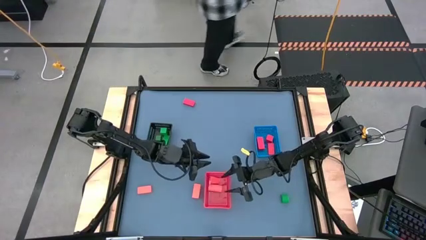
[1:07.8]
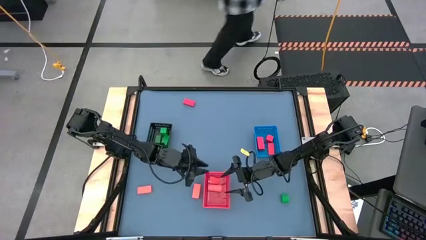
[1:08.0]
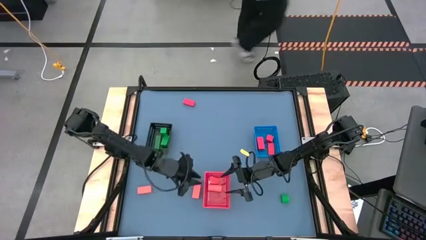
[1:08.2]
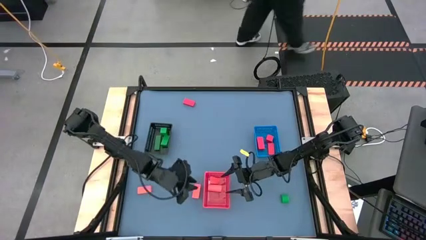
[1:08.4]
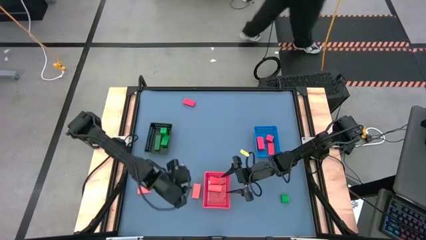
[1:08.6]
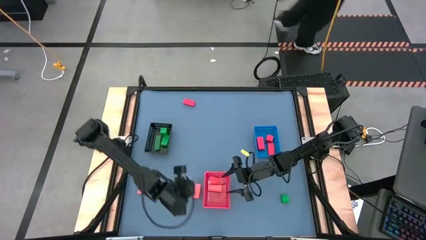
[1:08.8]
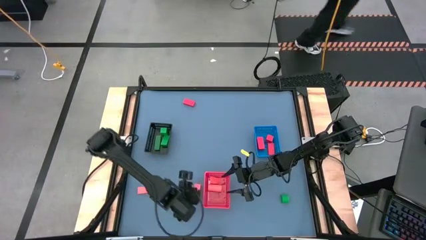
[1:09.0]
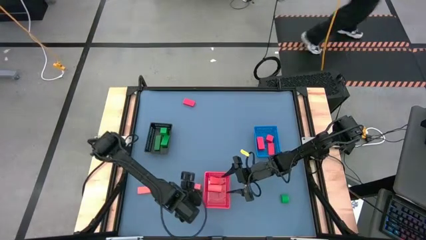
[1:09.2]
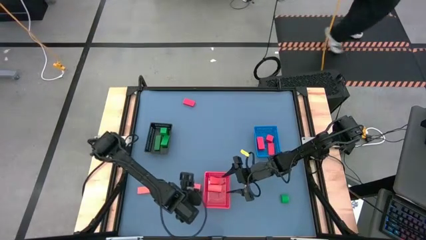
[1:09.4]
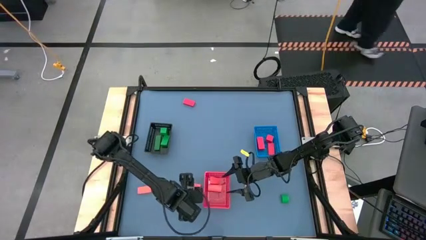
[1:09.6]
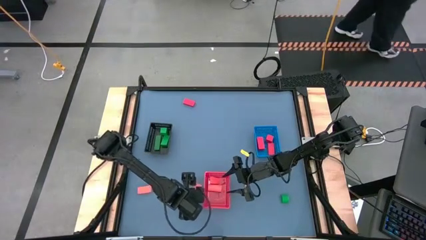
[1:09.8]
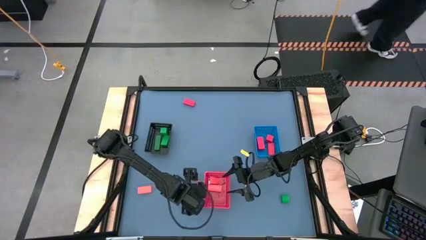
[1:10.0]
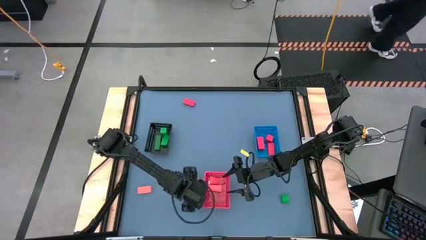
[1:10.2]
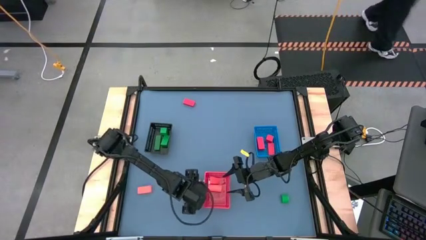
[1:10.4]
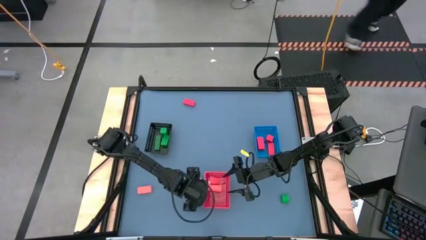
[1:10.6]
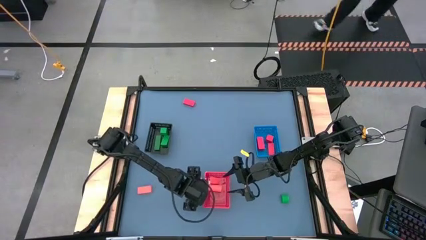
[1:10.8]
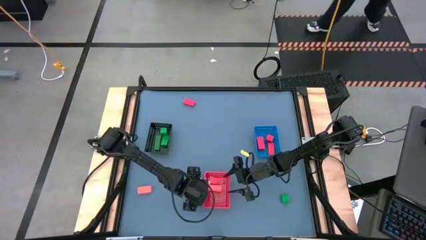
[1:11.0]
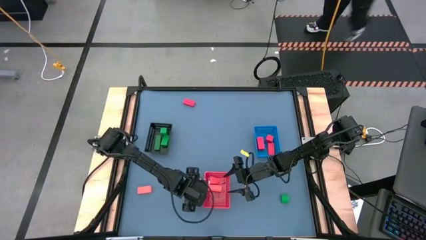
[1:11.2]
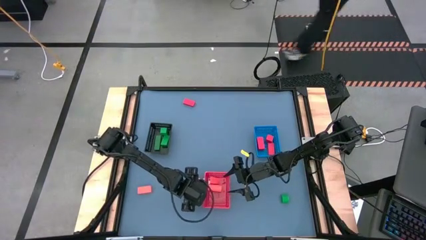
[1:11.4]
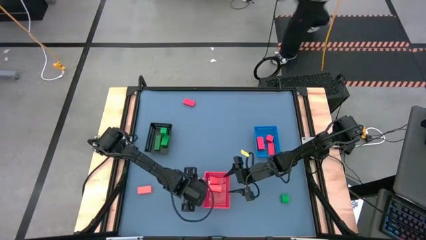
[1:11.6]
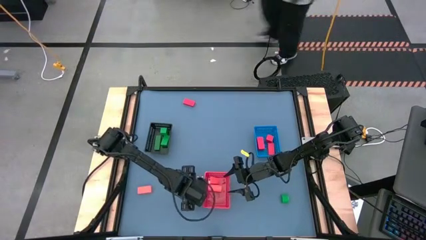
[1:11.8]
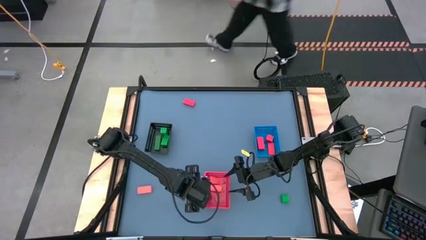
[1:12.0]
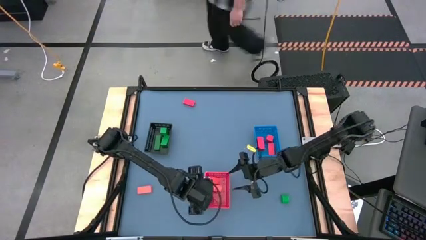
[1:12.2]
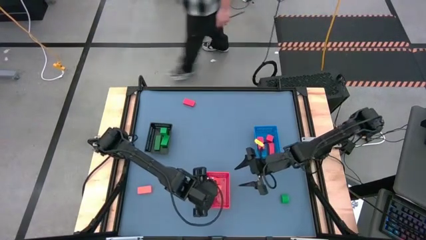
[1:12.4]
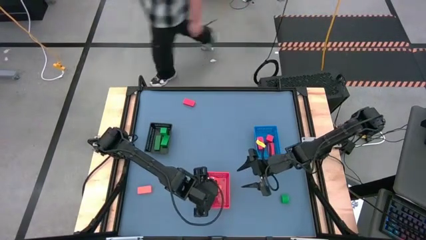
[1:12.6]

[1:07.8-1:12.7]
Task: Sort & place blocks by color
Put the orange block into the orange bin

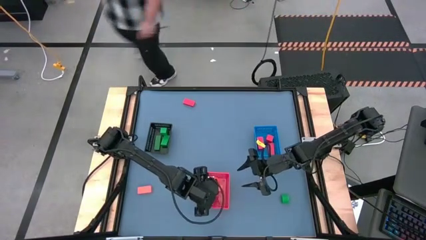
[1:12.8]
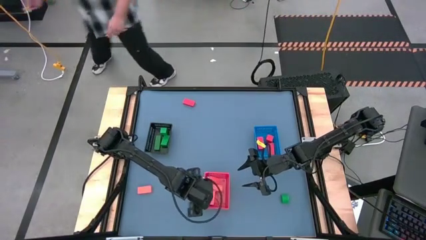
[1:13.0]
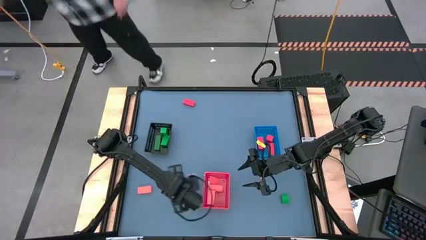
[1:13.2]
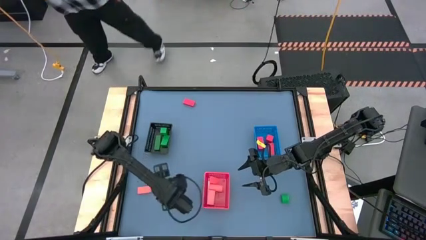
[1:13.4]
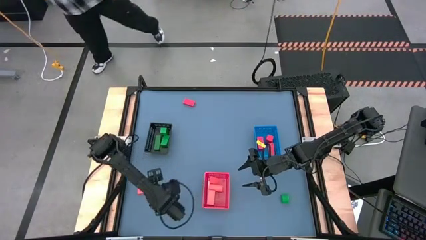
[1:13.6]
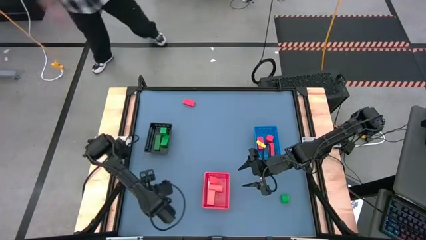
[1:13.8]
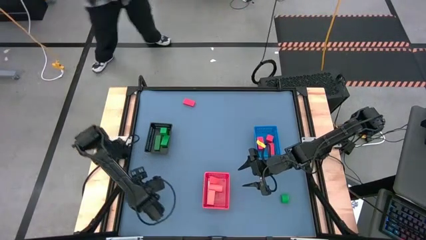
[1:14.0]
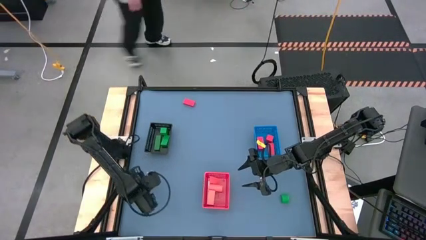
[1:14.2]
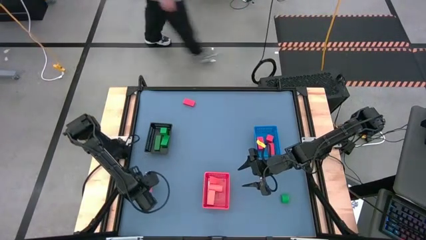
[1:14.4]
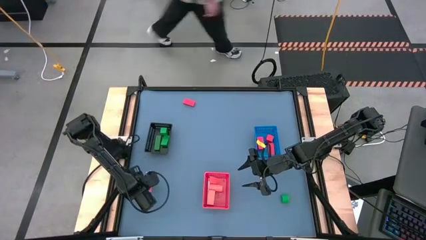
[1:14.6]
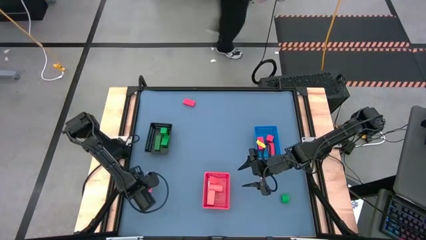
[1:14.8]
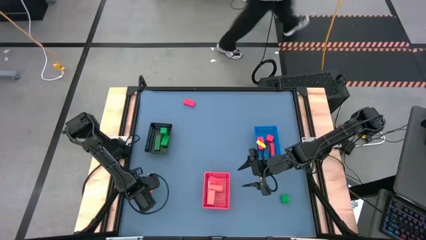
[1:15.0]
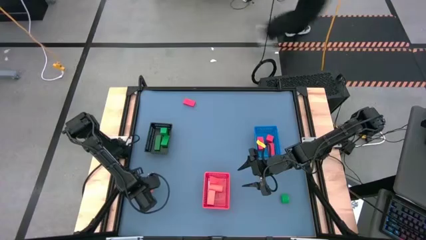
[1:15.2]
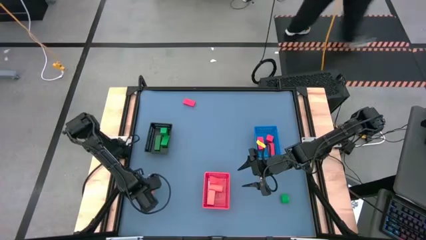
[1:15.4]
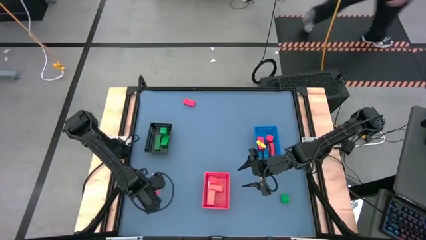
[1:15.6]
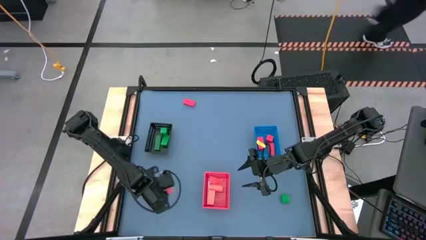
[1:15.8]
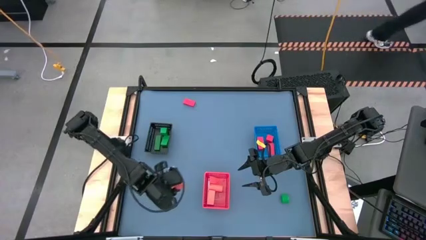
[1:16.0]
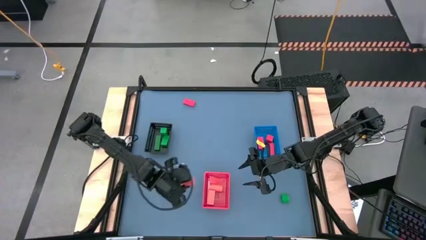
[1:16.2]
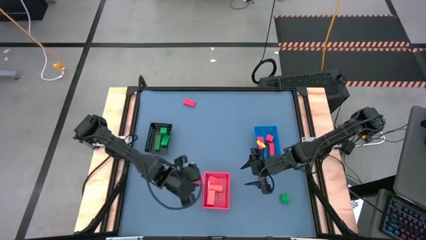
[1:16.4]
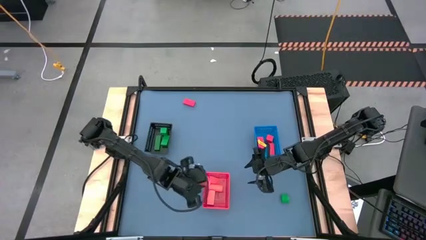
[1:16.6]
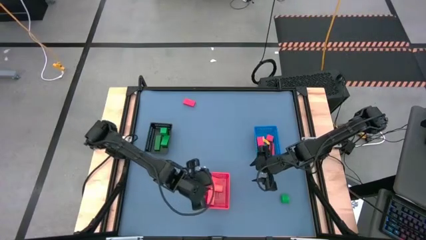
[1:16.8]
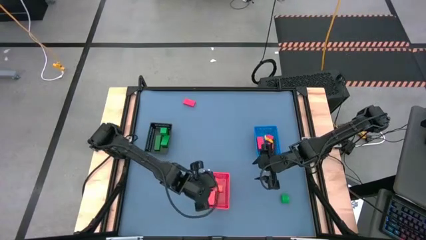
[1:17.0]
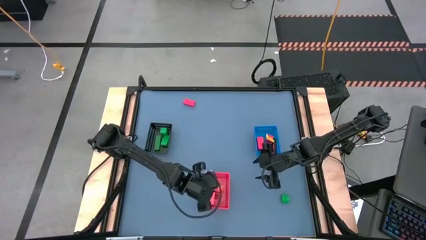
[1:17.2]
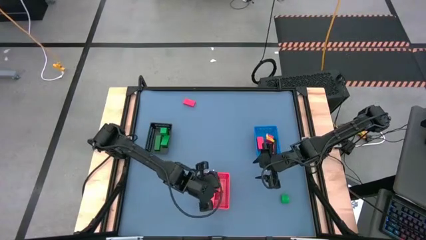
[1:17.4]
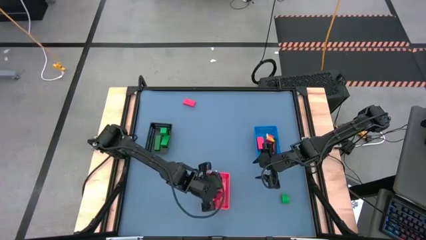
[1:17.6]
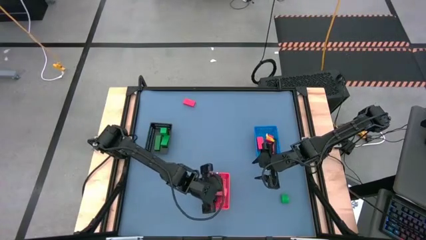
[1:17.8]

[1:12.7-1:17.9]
Put the orange block into the orange bin

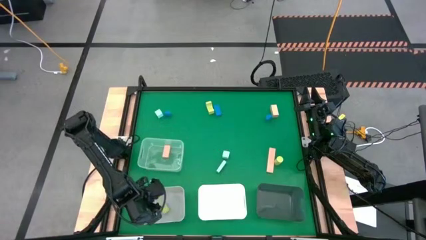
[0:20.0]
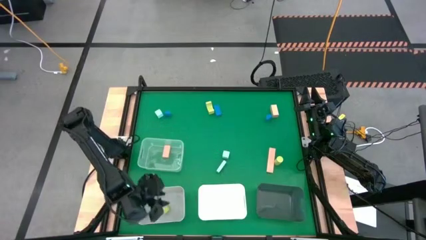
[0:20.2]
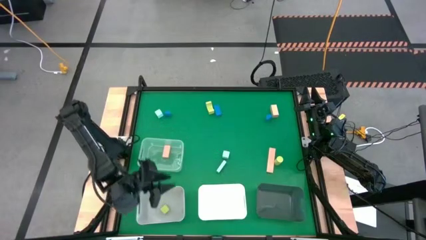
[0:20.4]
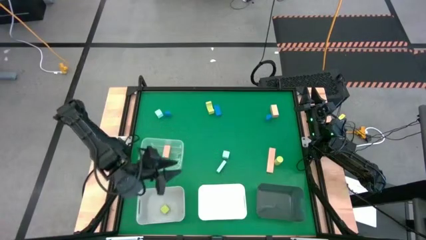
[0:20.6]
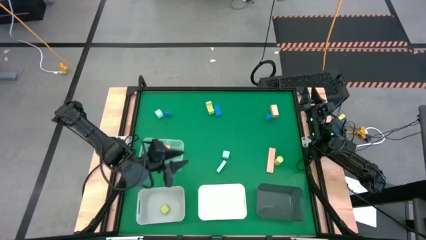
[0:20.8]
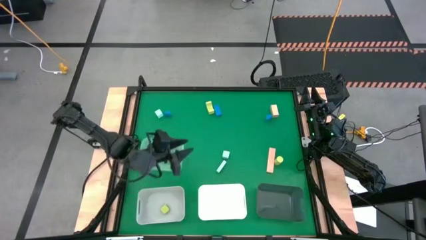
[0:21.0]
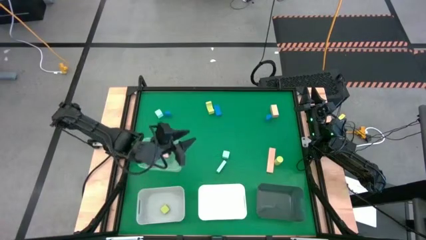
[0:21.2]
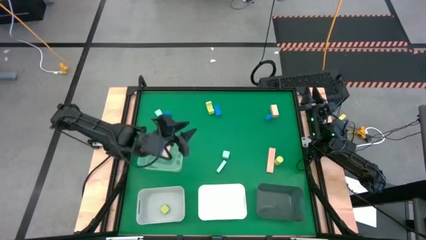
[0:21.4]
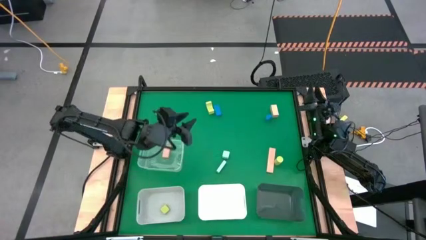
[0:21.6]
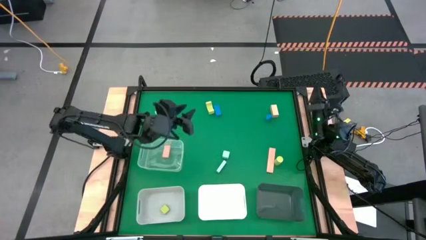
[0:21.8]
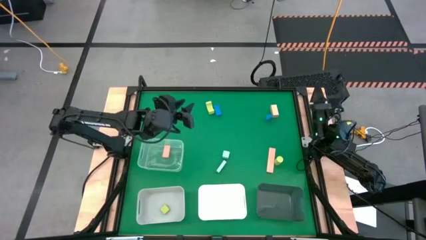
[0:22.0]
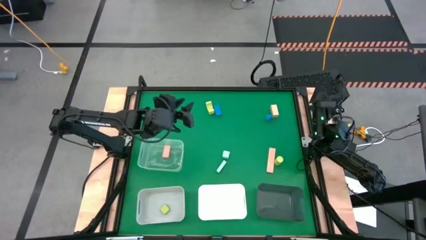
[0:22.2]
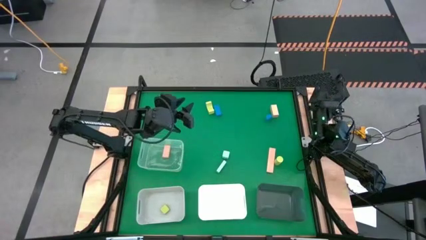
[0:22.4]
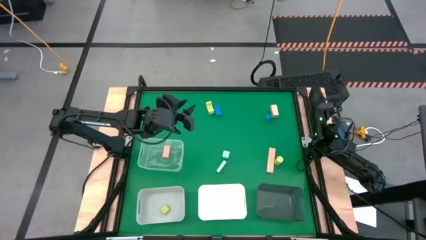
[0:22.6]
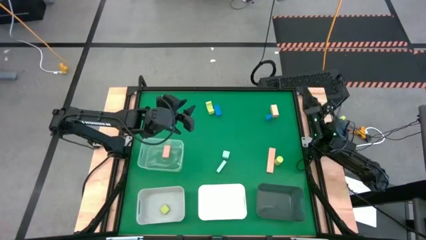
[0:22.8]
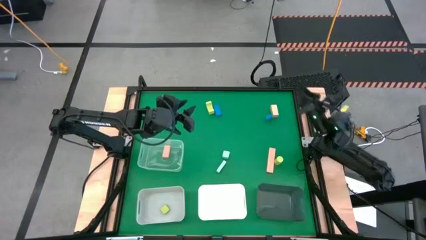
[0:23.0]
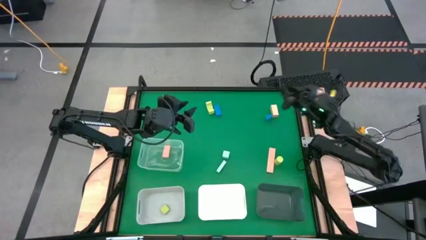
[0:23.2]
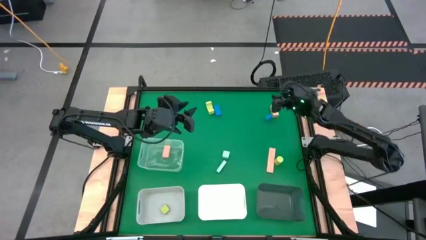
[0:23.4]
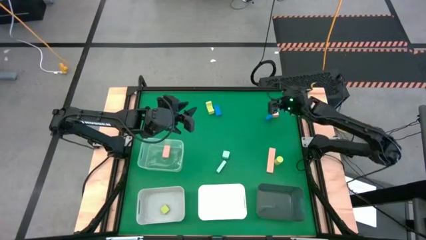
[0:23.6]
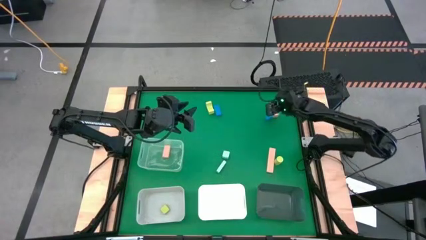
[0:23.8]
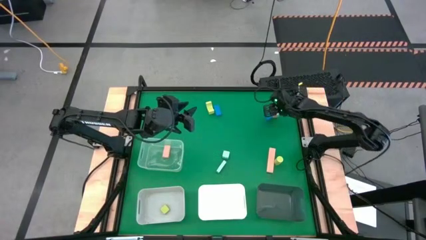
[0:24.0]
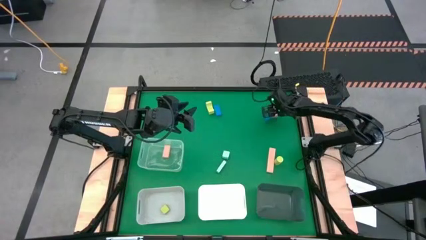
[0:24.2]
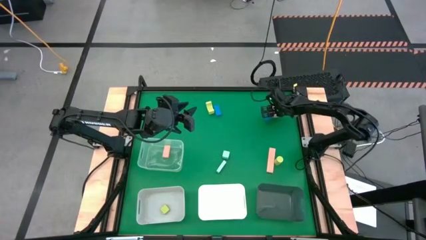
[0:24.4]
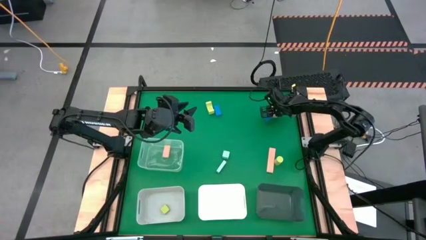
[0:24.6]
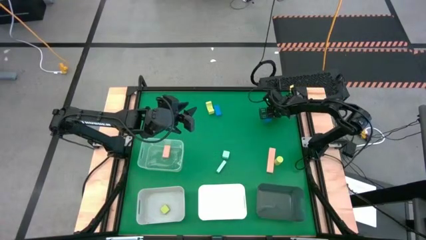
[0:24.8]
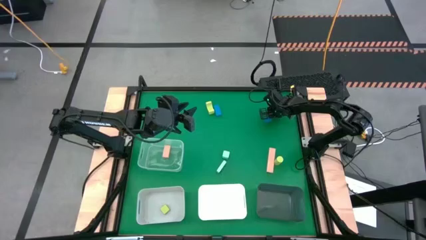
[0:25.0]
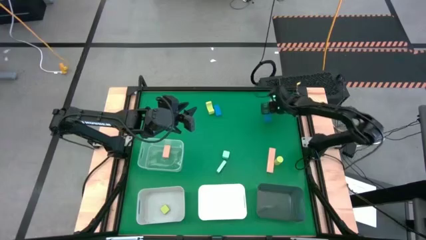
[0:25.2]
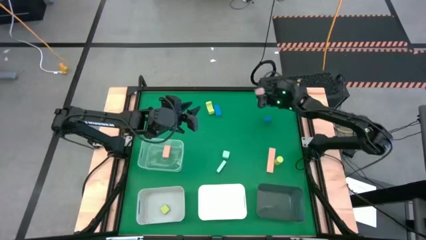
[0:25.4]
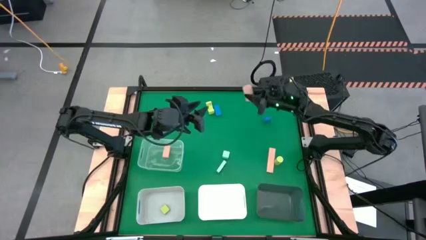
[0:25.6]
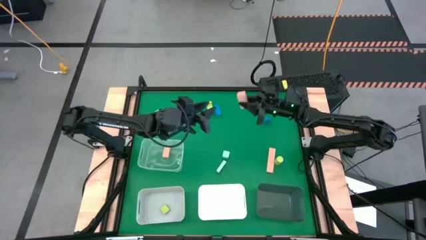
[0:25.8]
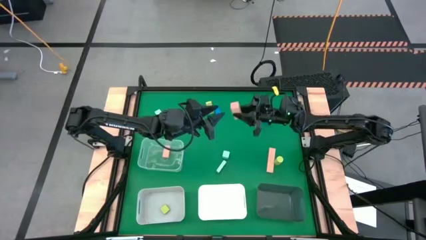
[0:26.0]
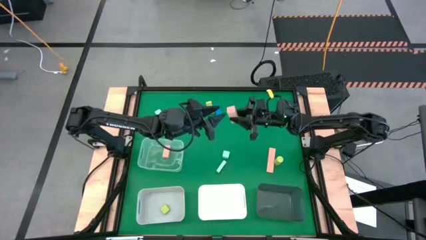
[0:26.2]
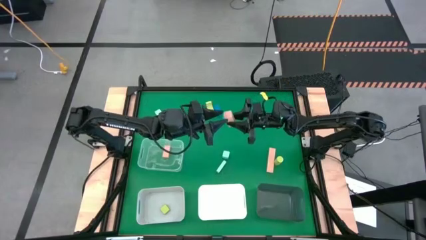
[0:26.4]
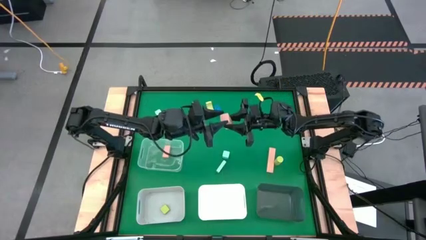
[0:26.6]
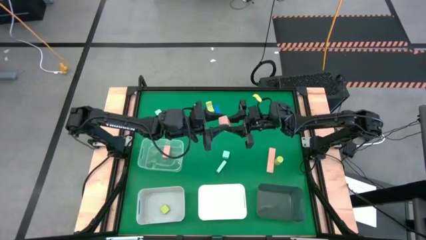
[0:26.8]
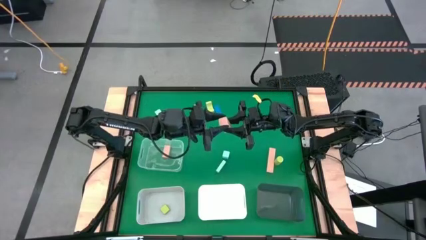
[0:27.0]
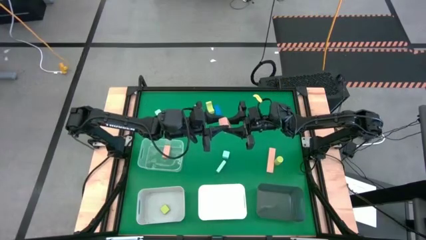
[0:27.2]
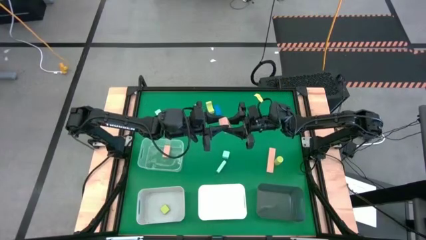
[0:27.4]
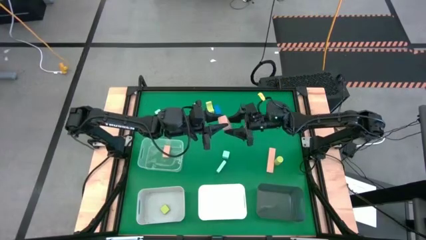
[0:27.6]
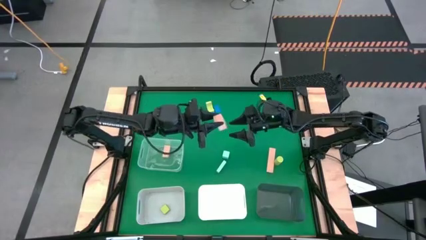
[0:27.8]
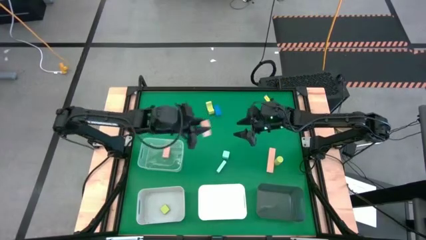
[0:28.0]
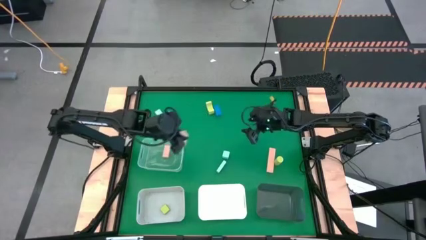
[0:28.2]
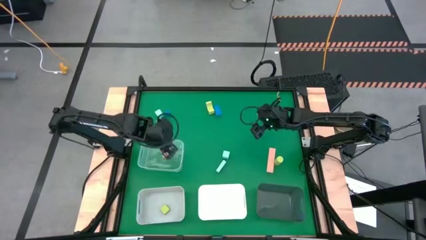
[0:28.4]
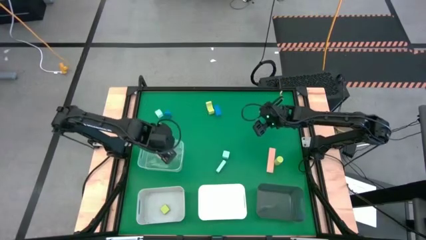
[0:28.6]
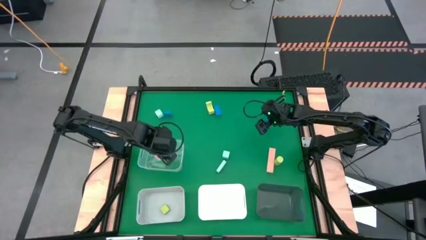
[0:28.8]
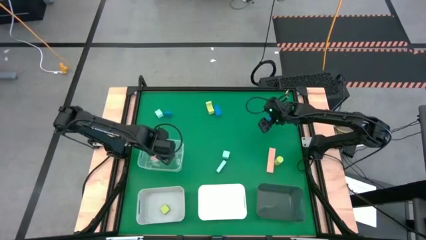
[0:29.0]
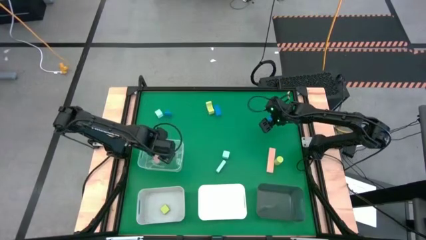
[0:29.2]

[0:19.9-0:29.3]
Task: Sort & place blocks by color
Put the top light brown block into the transparent bin
